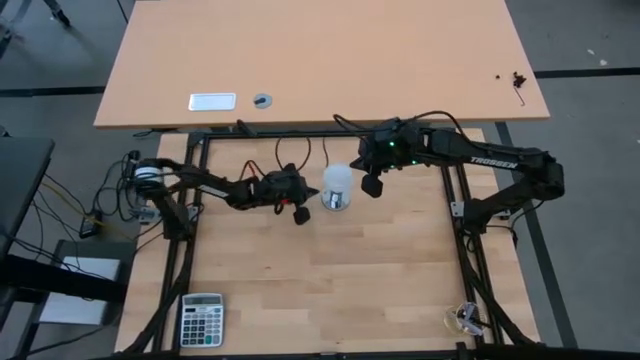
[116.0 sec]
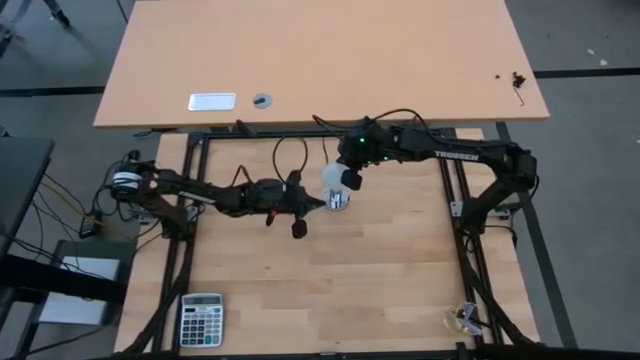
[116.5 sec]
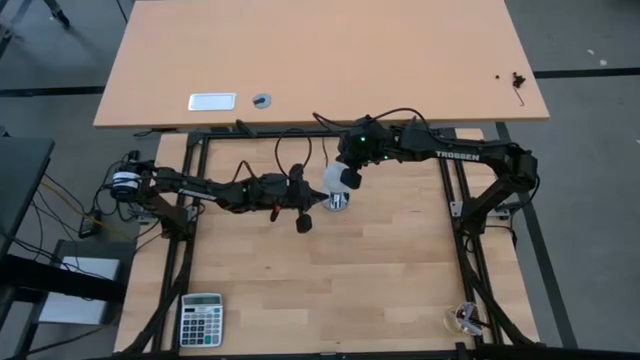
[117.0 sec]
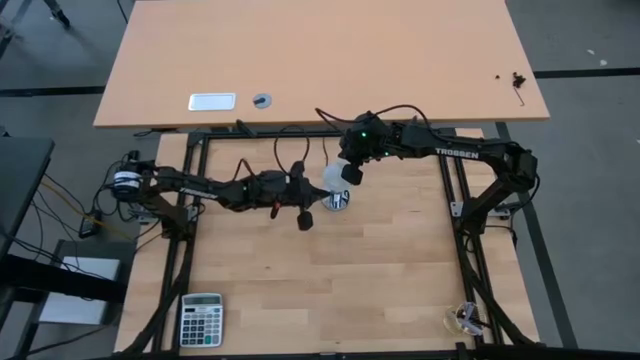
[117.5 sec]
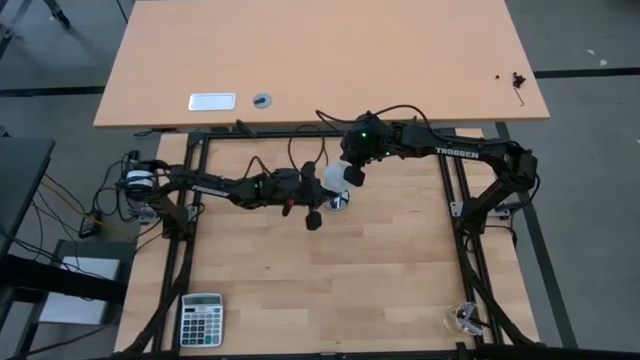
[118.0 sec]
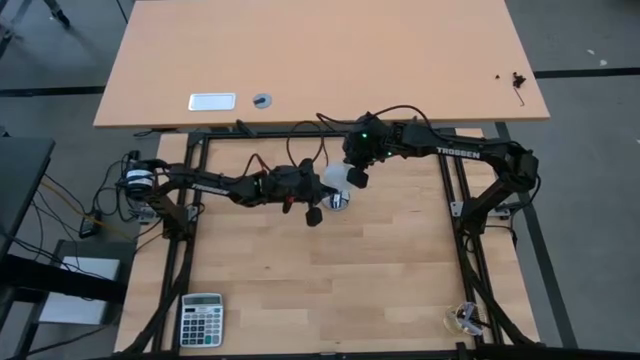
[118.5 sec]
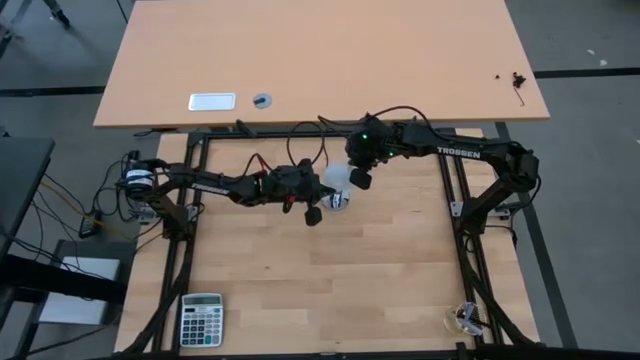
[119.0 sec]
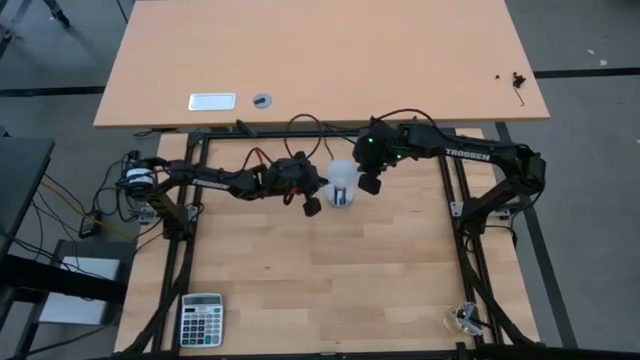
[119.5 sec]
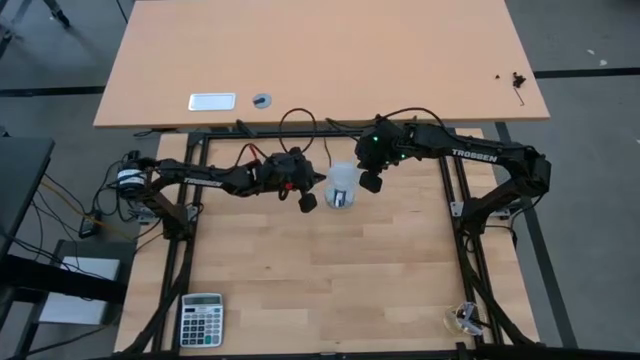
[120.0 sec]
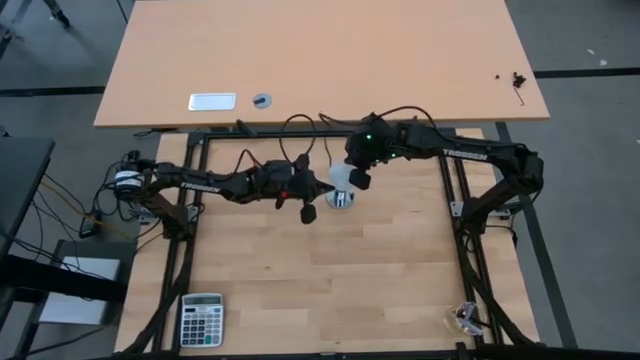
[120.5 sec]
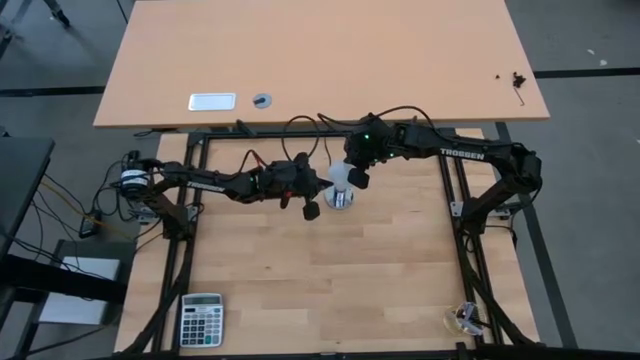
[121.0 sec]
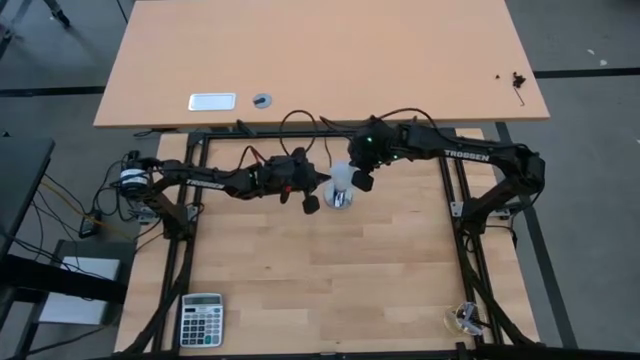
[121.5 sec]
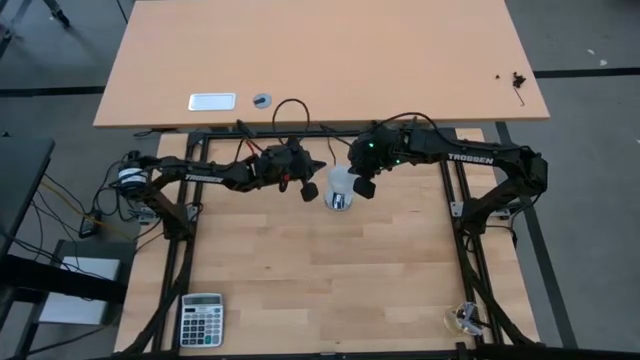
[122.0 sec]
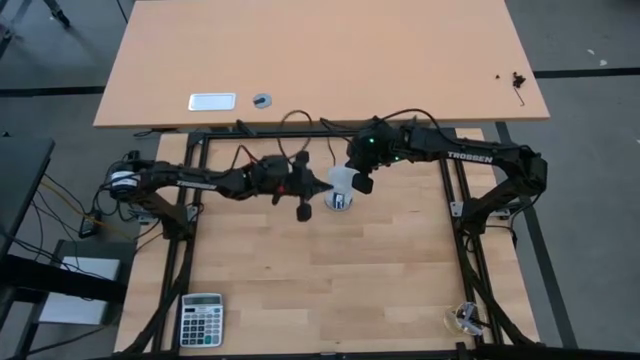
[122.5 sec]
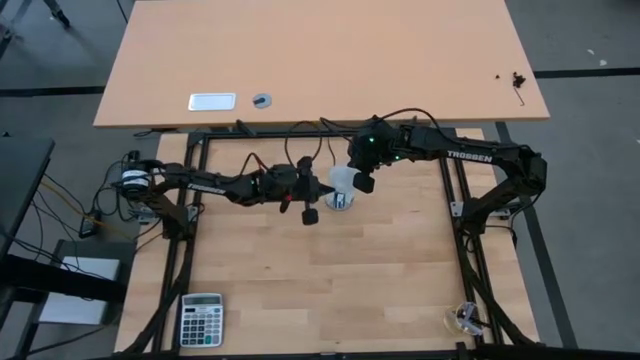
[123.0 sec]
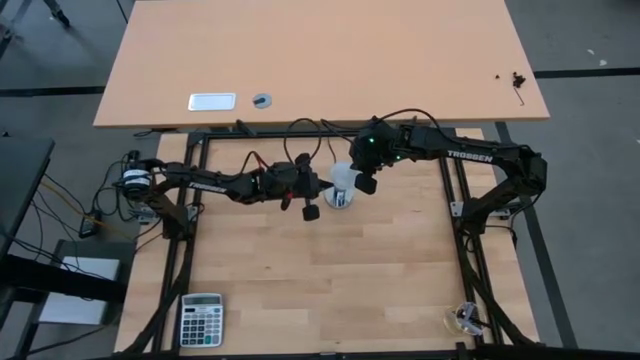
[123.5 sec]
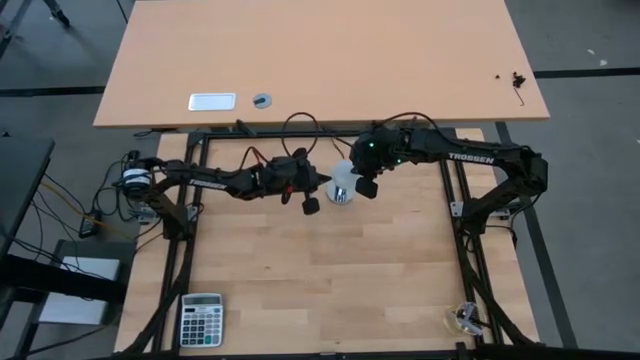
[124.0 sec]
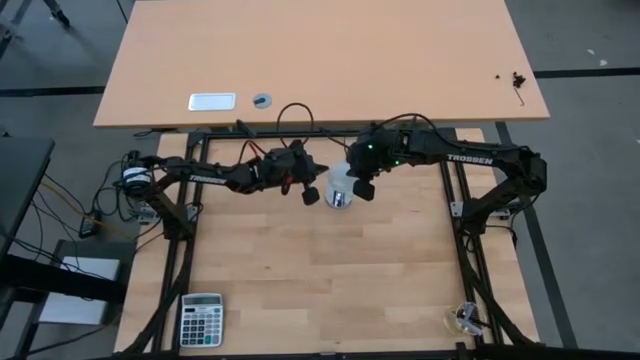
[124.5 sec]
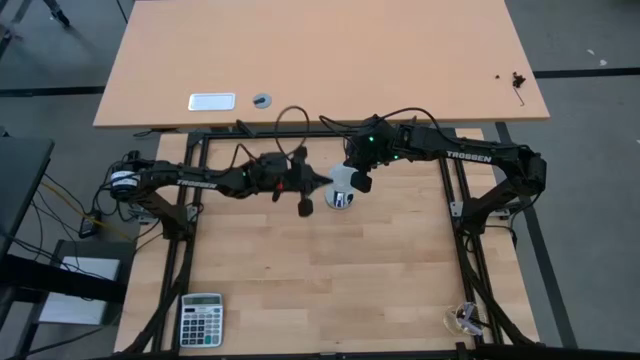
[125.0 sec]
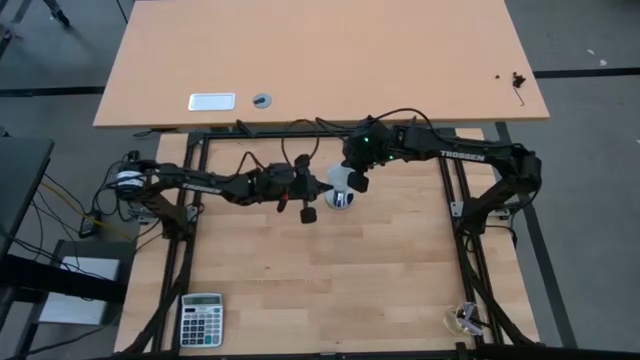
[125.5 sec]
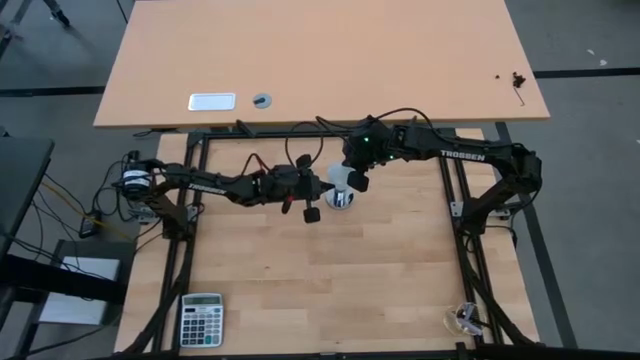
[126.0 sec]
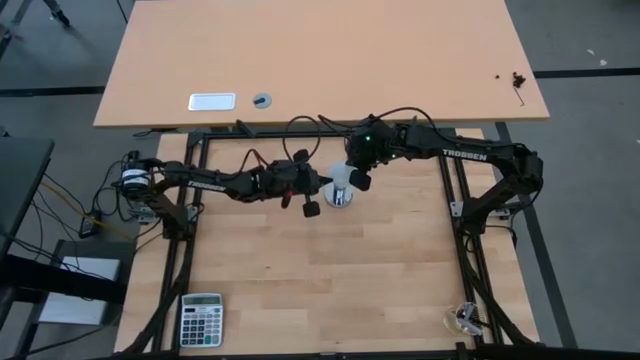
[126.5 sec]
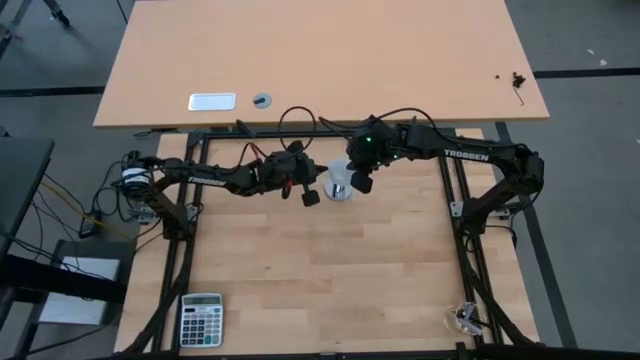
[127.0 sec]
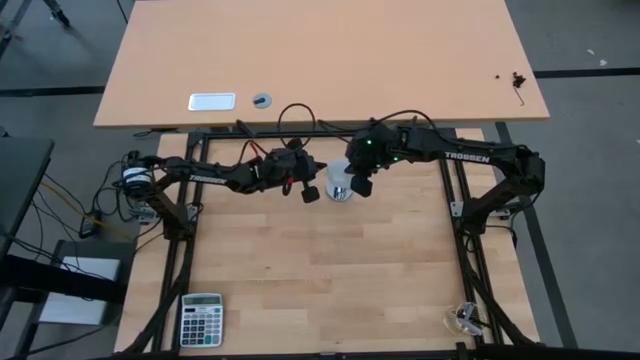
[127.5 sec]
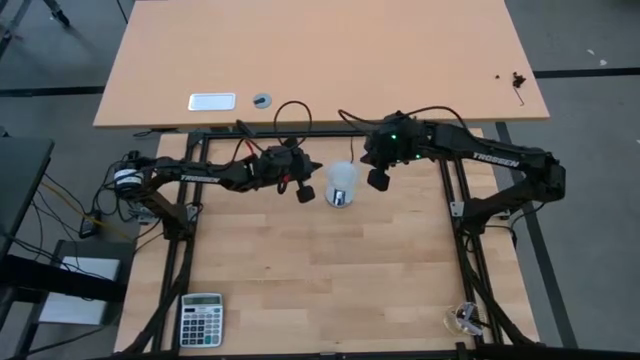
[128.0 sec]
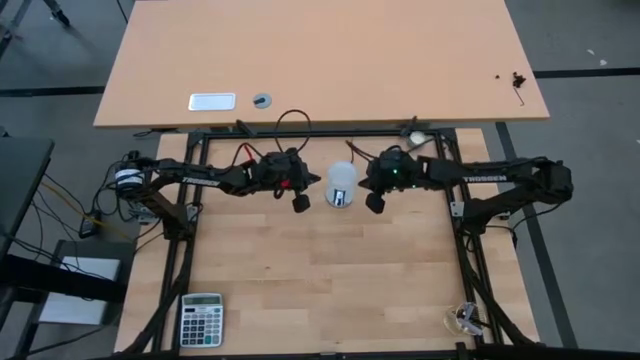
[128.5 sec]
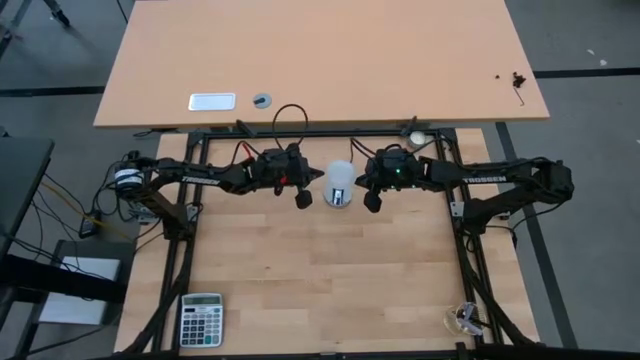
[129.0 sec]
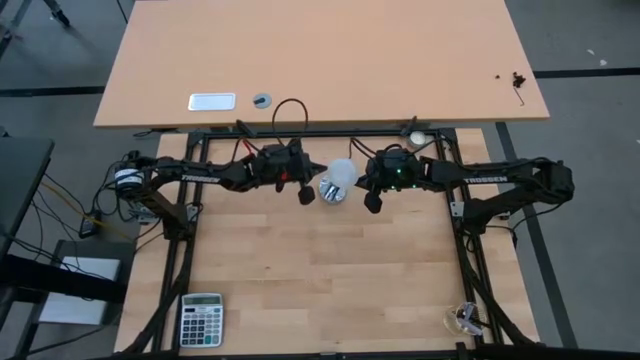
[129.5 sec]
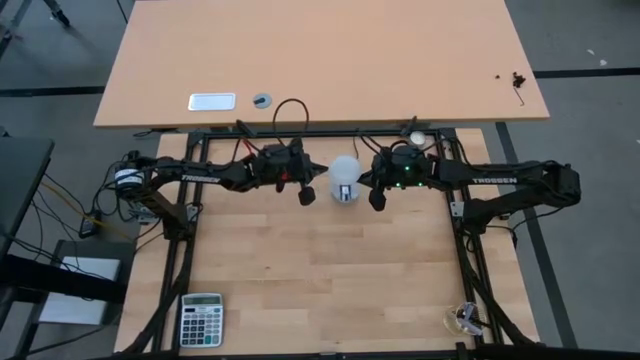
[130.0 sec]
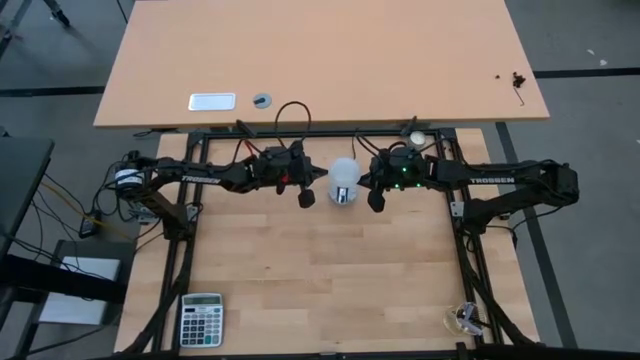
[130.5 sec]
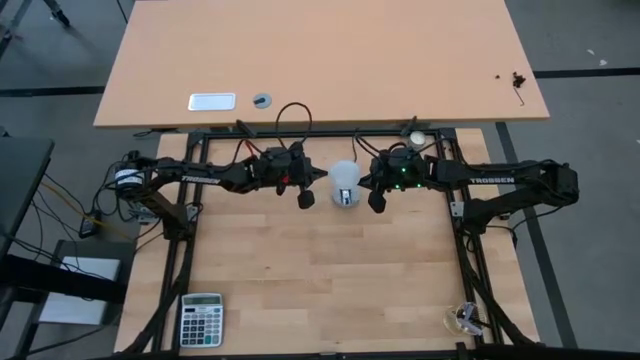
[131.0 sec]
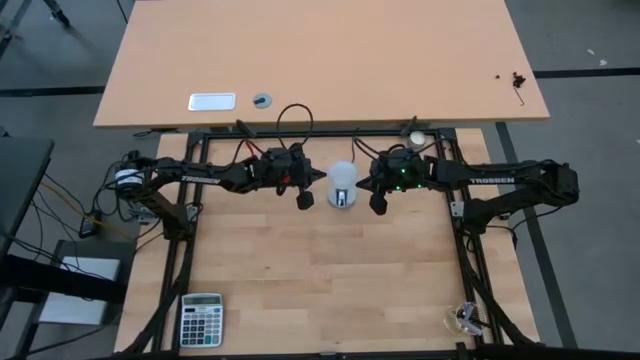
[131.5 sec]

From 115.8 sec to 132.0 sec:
Task: Screw lightbulb
Insert the lightbulb into the silver lamp socket

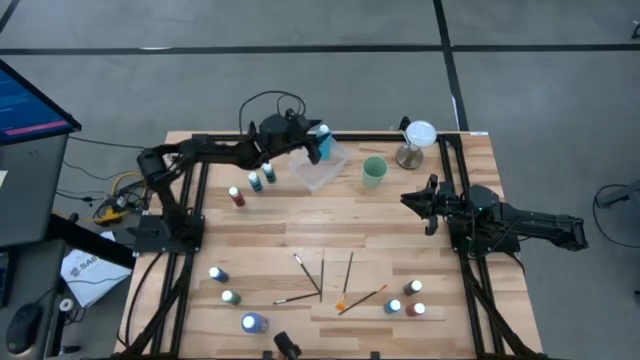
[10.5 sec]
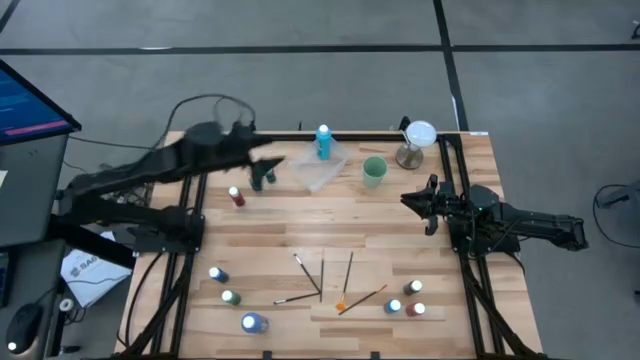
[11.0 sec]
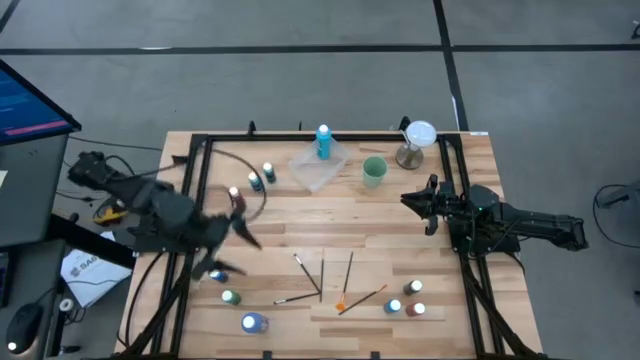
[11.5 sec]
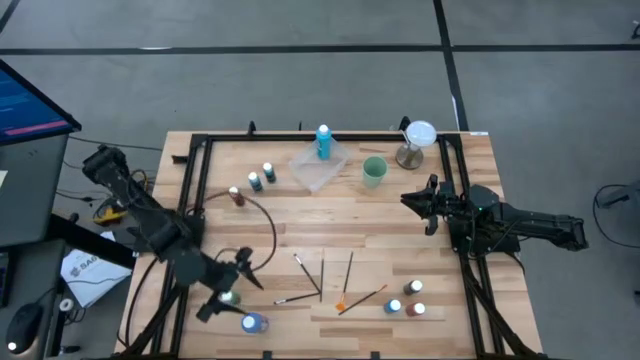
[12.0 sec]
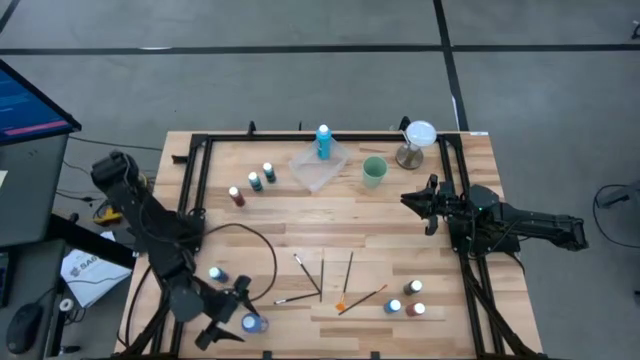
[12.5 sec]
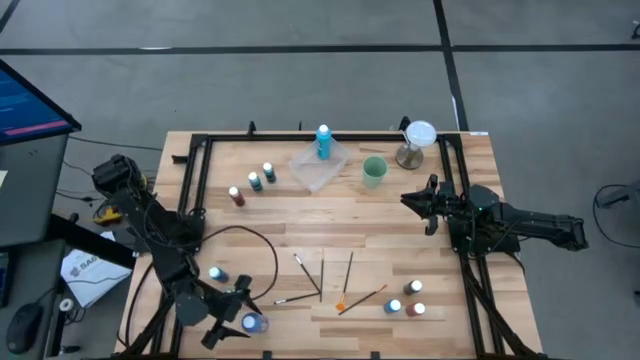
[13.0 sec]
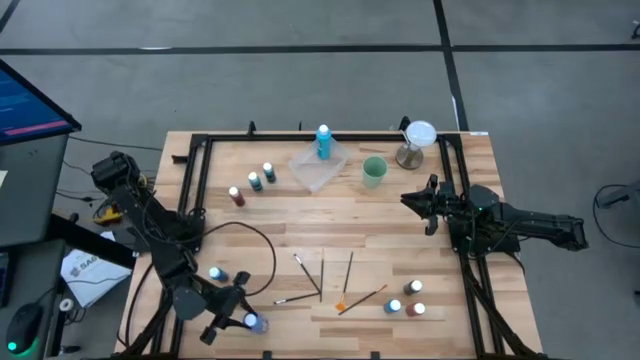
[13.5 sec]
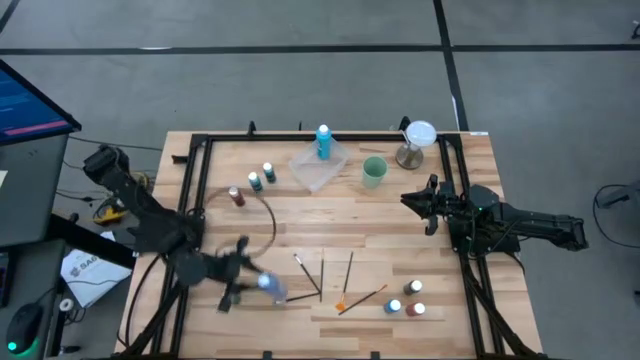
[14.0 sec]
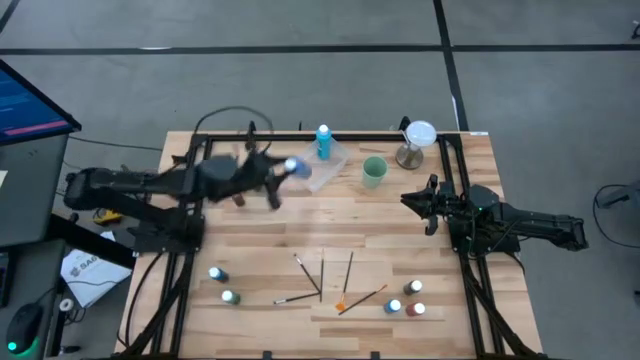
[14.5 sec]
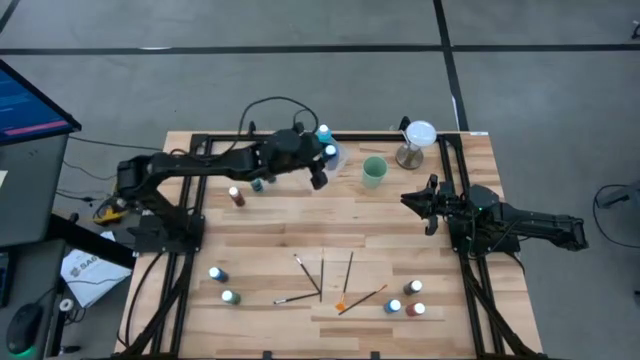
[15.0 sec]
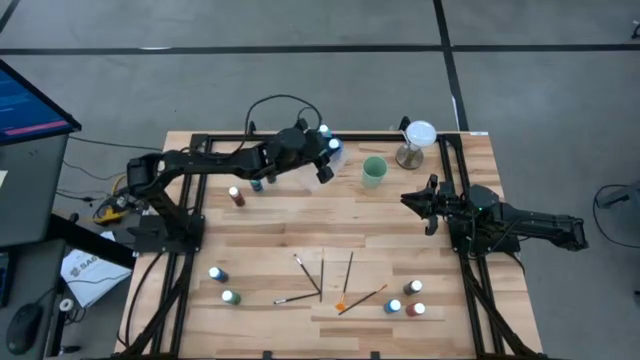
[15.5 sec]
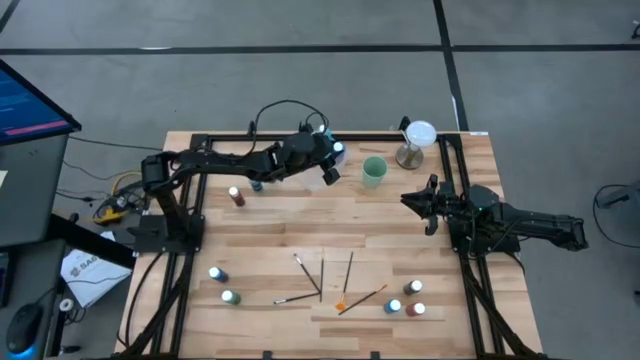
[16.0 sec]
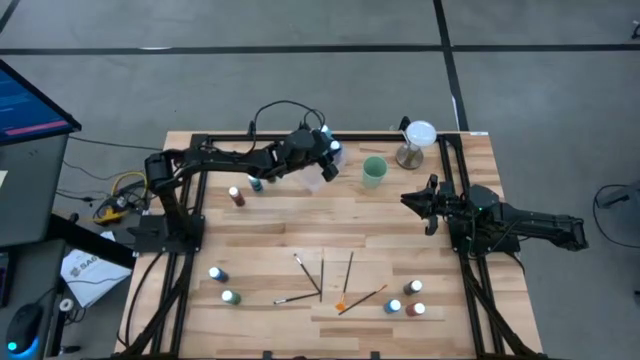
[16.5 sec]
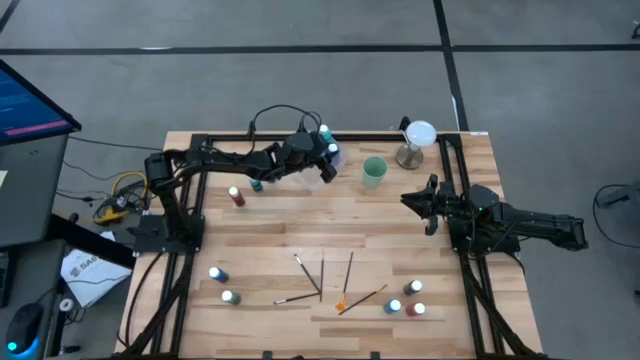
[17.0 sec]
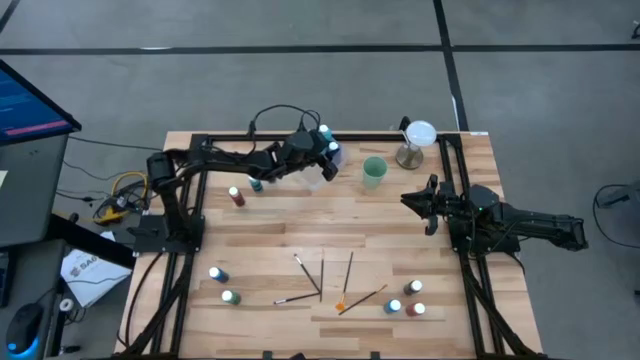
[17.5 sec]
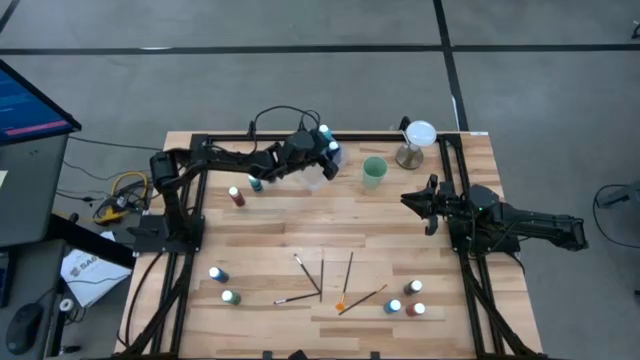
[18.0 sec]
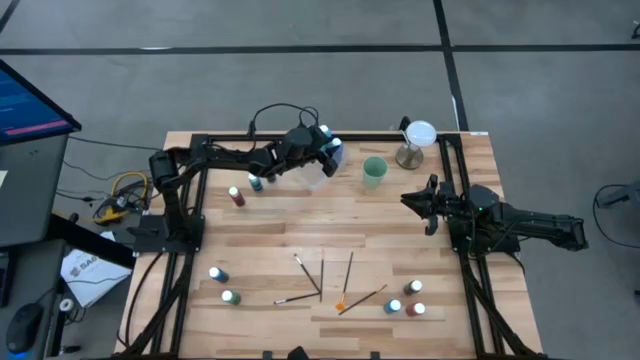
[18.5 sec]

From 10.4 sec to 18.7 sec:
Task: Pick & Place Paint Supplies
Put the large blue paint bottle into the transparent bin
